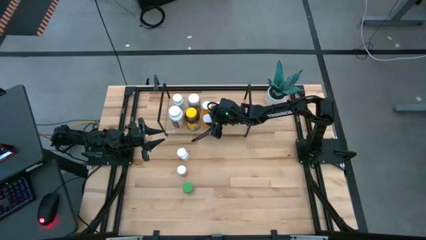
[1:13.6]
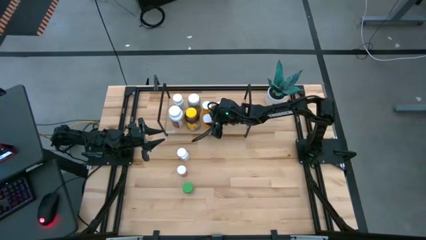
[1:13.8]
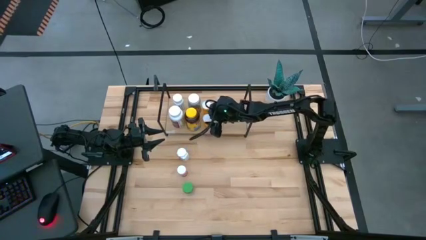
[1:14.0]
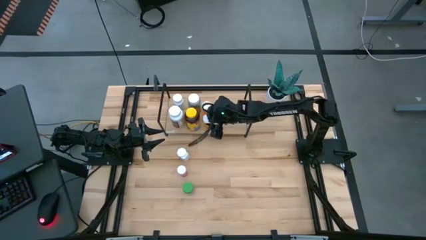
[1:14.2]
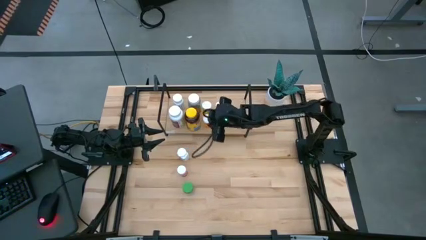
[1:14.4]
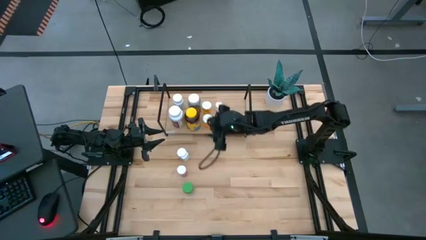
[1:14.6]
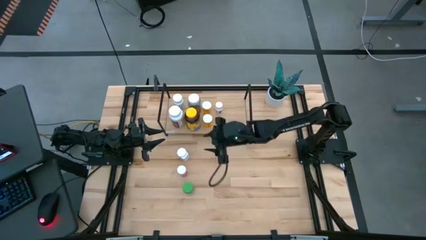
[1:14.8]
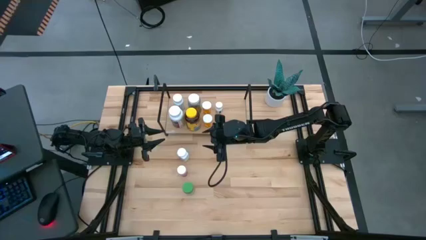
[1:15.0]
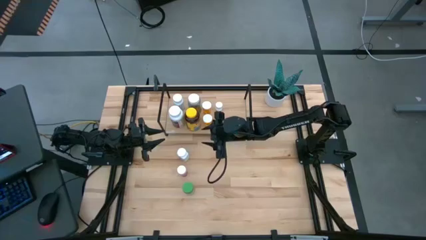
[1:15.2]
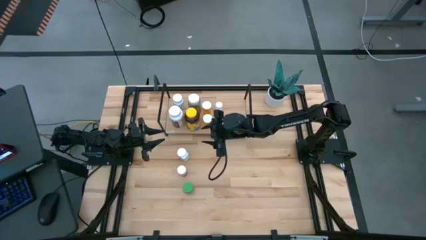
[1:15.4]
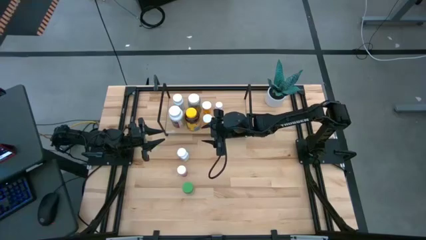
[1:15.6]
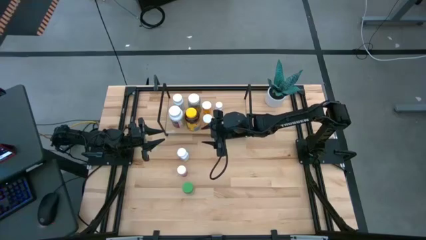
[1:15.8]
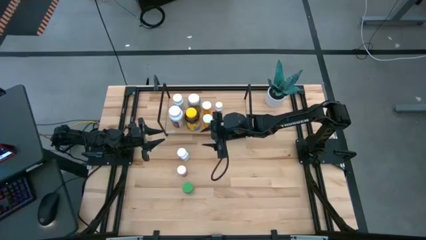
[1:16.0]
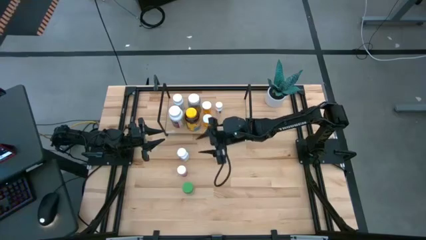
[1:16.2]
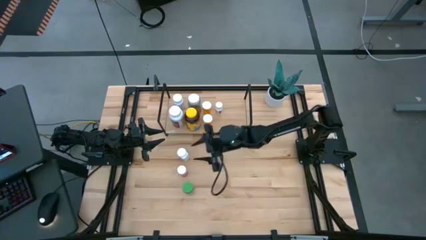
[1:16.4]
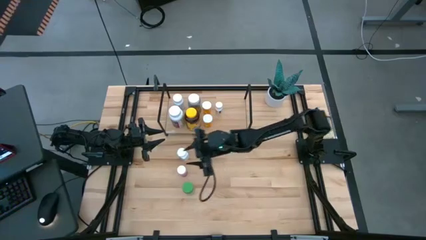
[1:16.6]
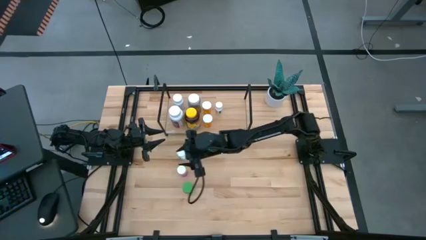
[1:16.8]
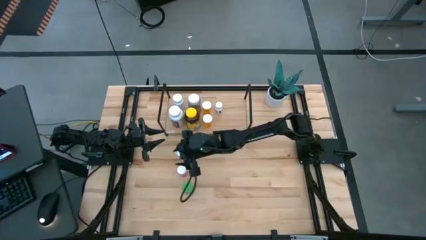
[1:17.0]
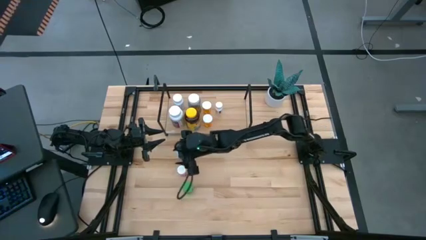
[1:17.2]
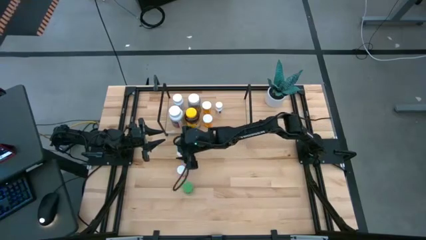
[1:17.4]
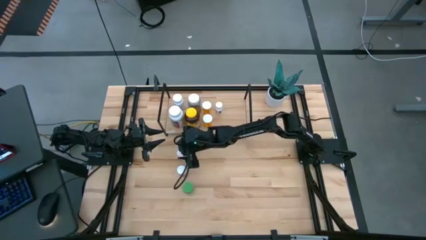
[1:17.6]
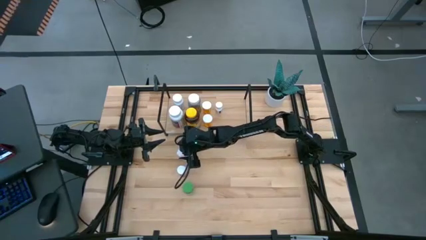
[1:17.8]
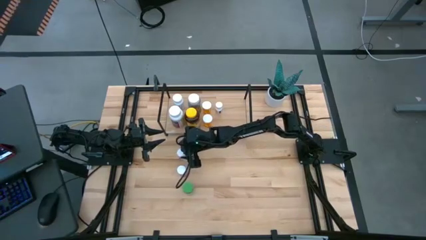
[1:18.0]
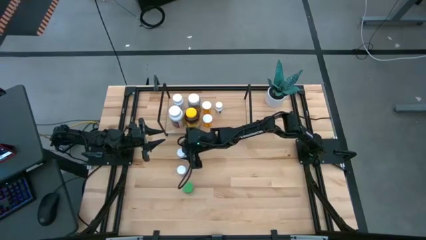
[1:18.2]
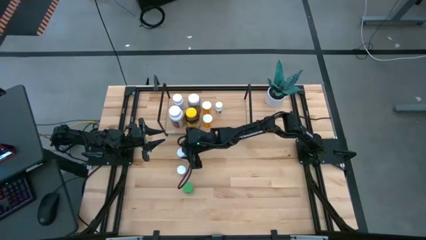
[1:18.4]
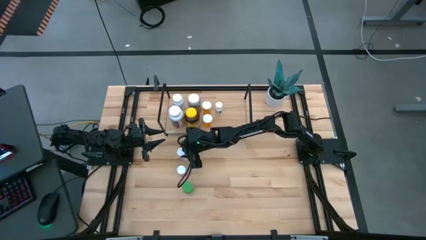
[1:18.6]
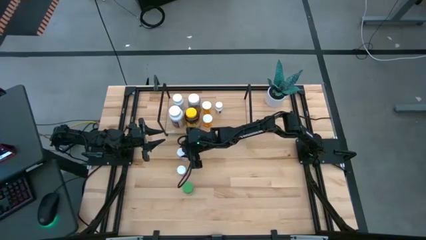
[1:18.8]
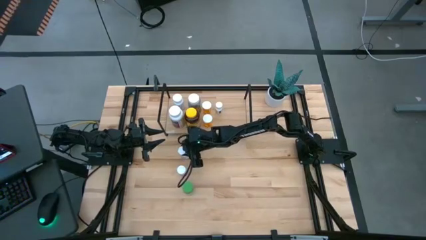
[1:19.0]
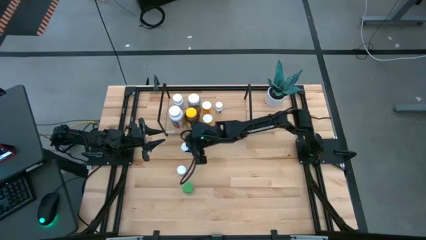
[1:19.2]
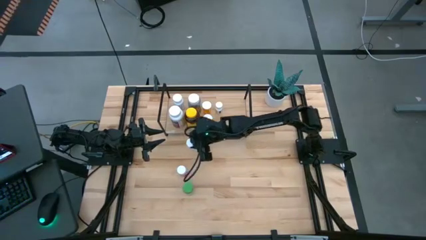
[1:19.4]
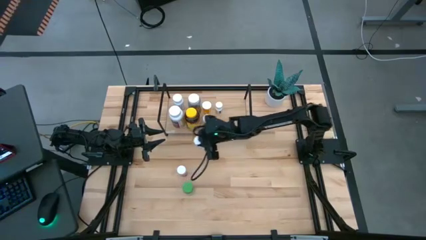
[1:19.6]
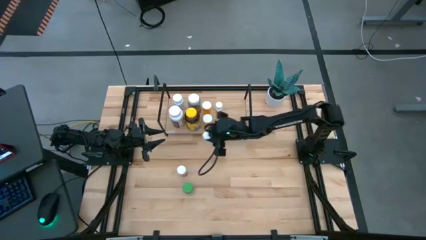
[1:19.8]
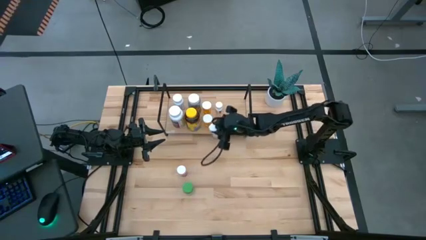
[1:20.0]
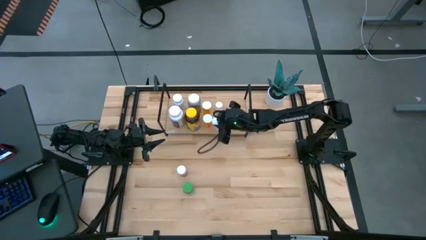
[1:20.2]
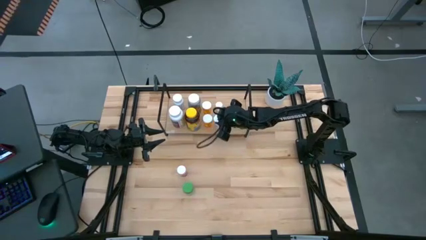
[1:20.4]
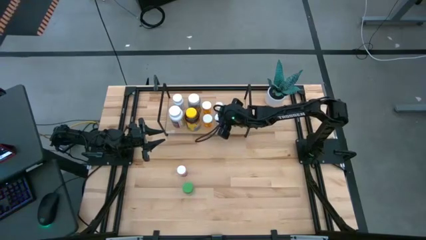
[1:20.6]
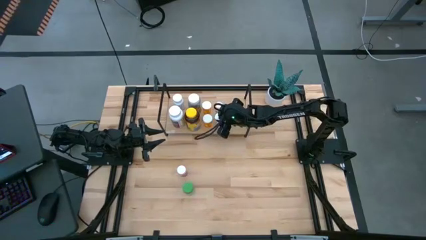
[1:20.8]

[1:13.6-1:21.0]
Task: Pick and place medicine bottles onto shelf by color
Put the white bottle on the shelf

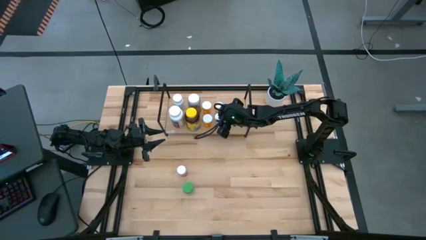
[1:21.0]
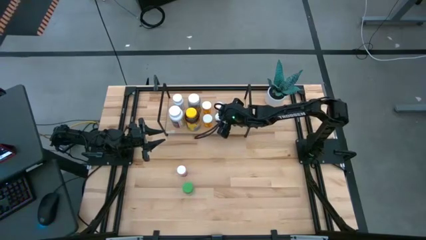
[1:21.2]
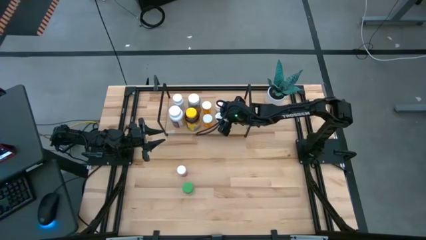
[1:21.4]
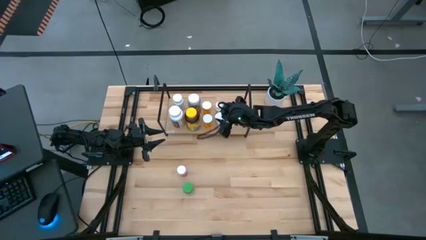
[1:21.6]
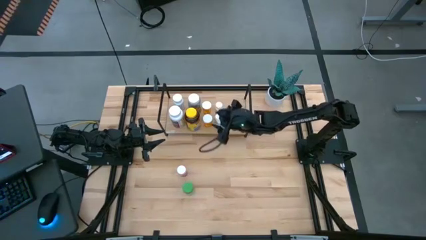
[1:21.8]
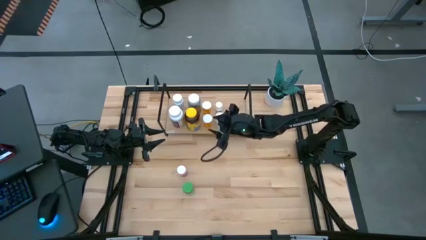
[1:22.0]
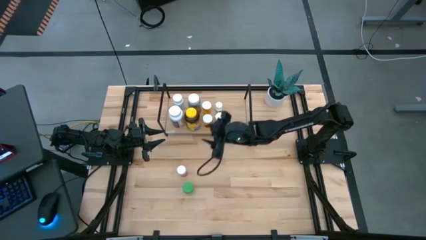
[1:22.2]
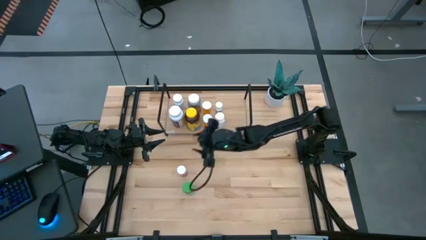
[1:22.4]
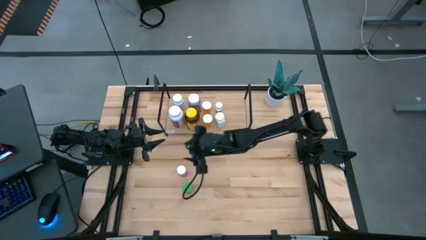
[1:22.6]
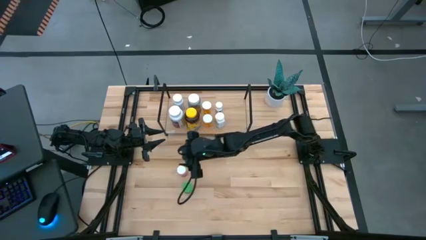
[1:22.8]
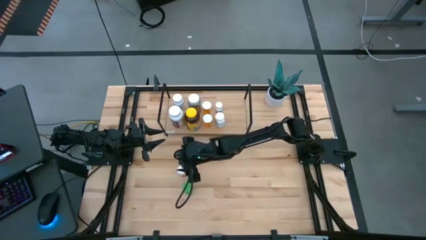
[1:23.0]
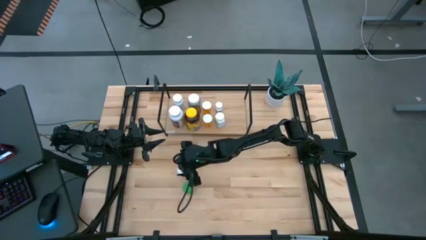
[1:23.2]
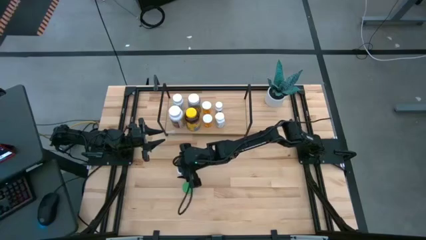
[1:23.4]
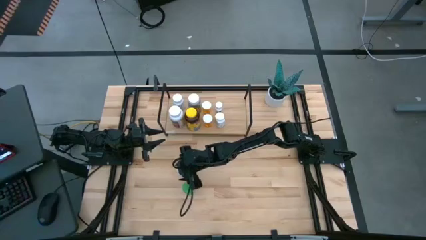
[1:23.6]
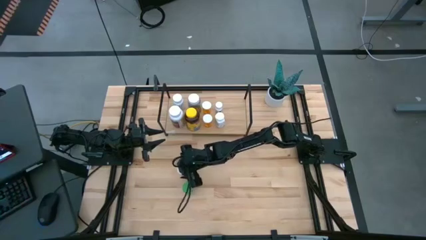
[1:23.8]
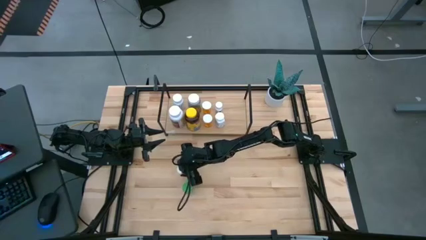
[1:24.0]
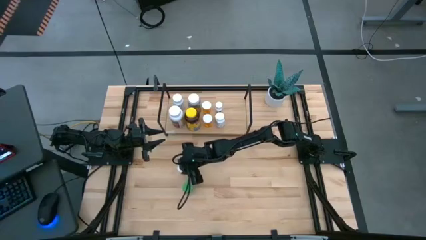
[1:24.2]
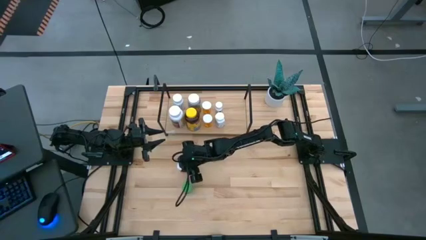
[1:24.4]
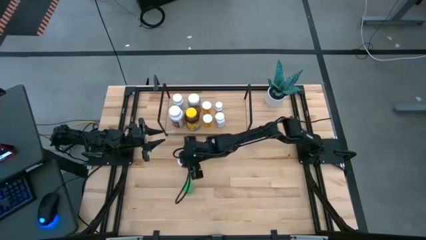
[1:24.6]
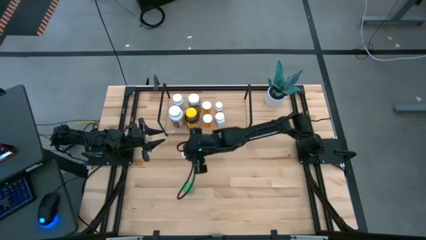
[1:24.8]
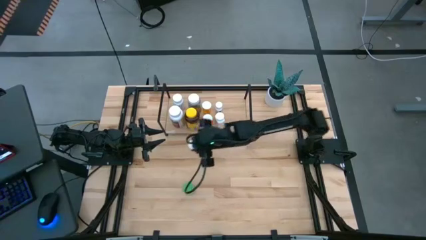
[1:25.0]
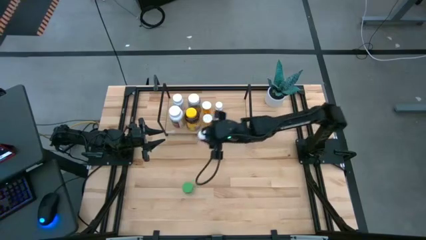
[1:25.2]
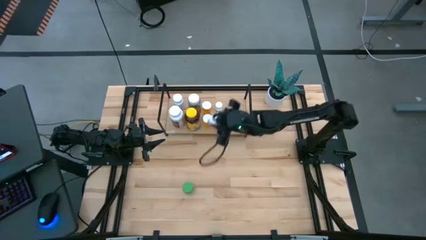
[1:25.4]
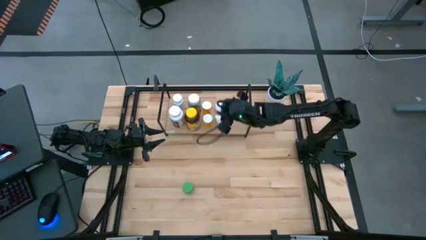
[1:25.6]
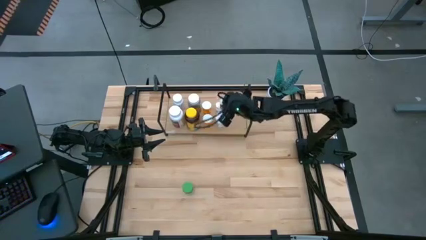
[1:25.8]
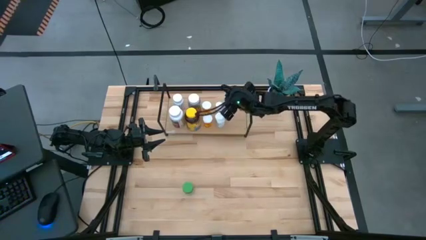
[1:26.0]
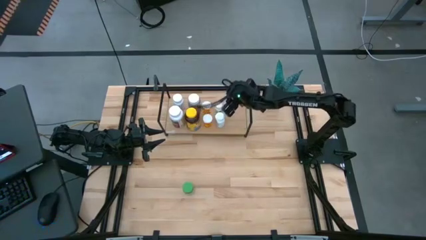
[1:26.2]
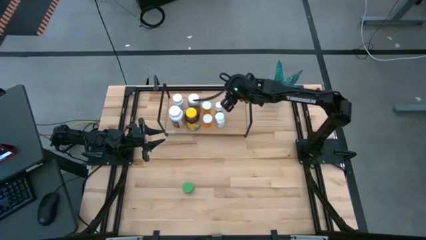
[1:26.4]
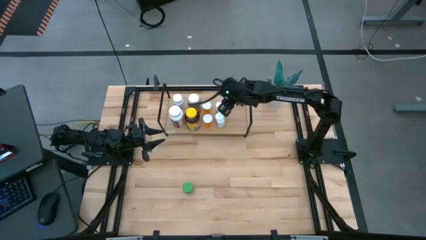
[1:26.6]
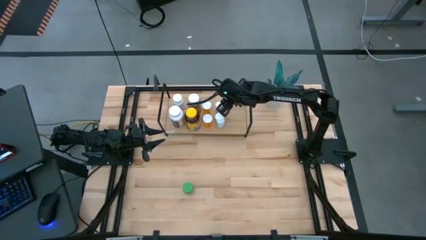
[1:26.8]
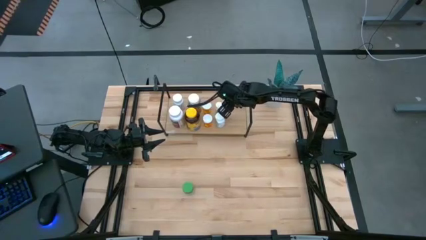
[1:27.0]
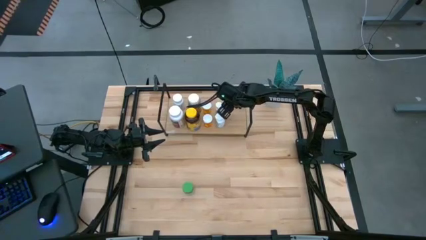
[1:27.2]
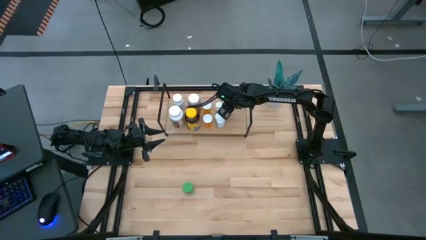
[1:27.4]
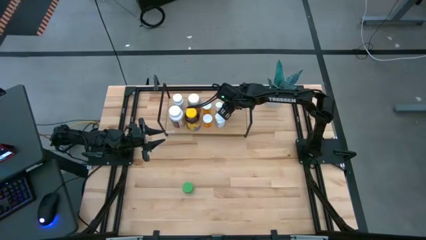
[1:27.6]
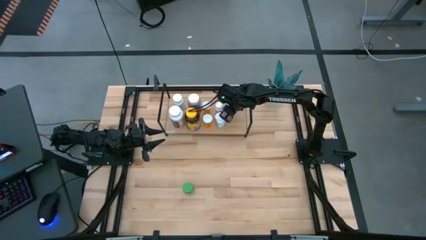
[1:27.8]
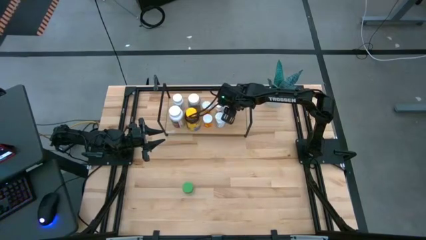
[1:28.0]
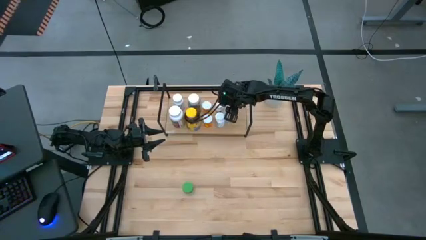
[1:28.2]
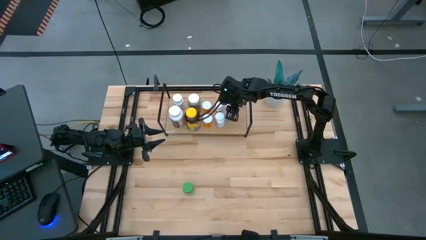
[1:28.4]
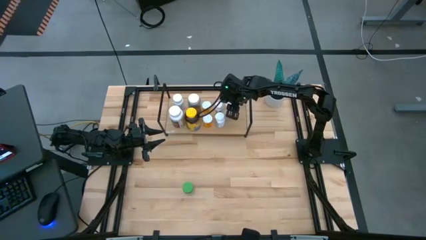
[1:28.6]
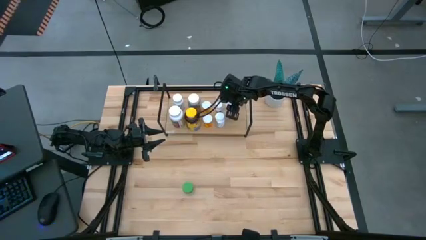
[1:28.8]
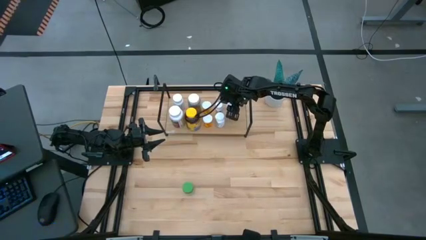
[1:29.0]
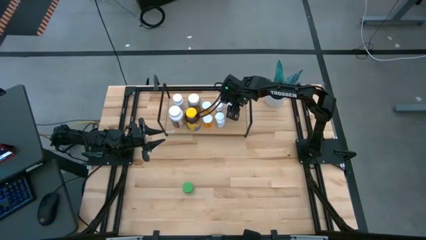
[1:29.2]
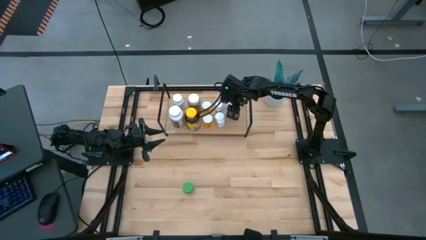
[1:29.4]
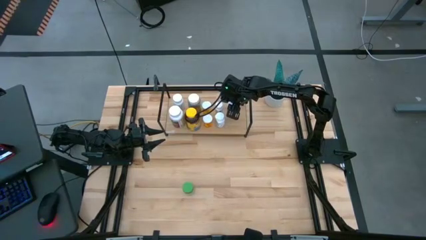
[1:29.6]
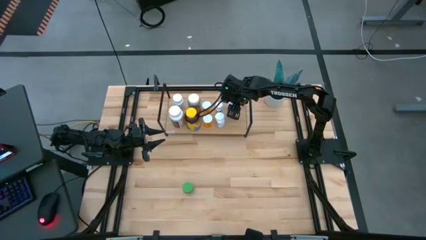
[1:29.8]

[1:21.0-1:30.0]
Put the pink bottle on the shelf
